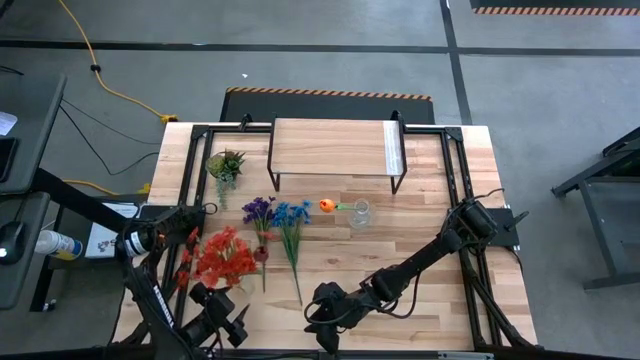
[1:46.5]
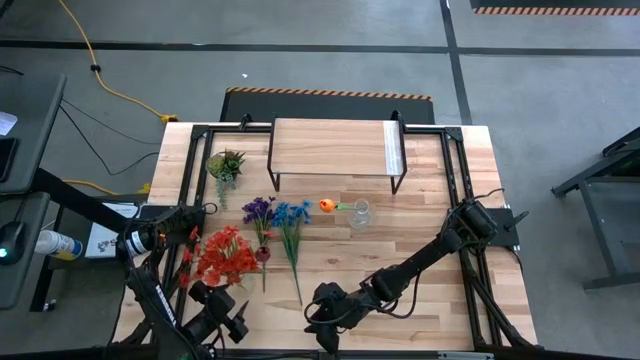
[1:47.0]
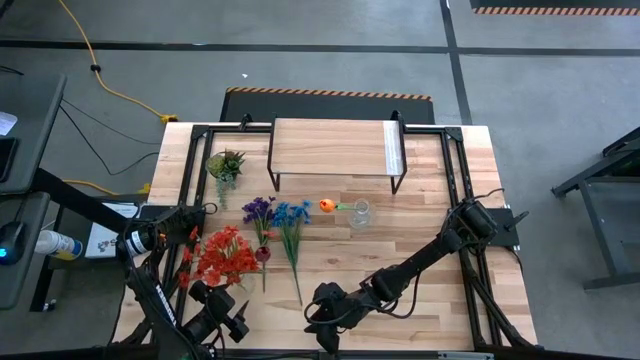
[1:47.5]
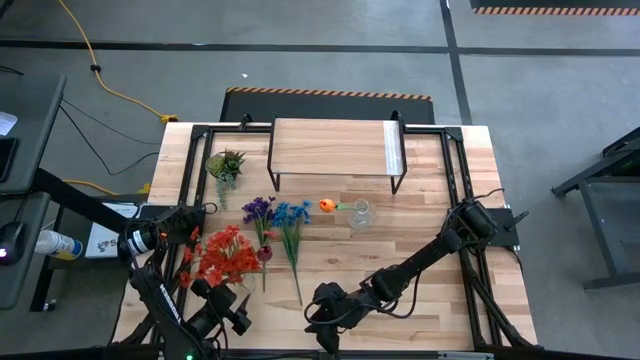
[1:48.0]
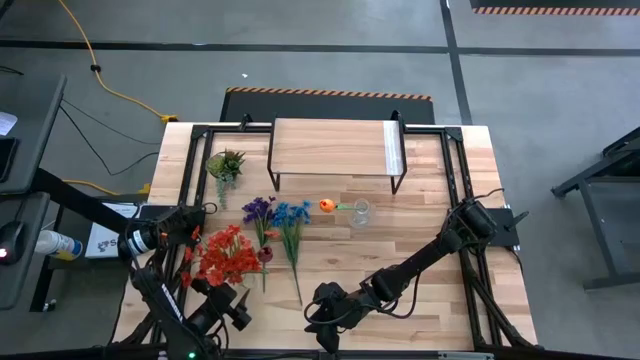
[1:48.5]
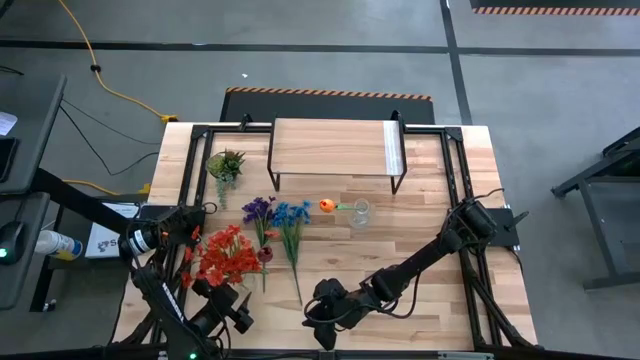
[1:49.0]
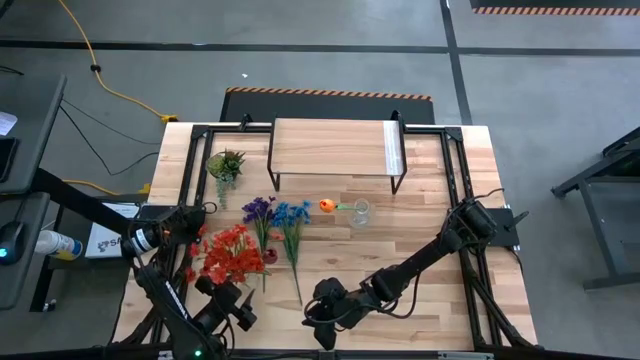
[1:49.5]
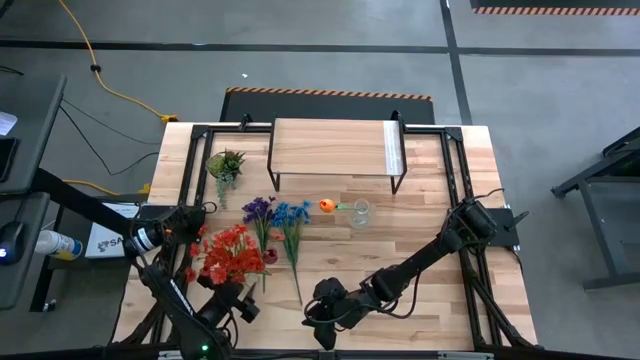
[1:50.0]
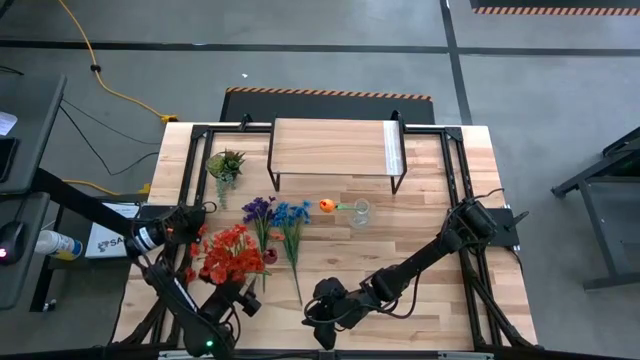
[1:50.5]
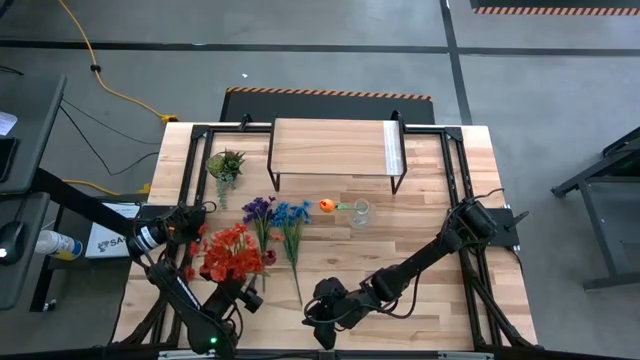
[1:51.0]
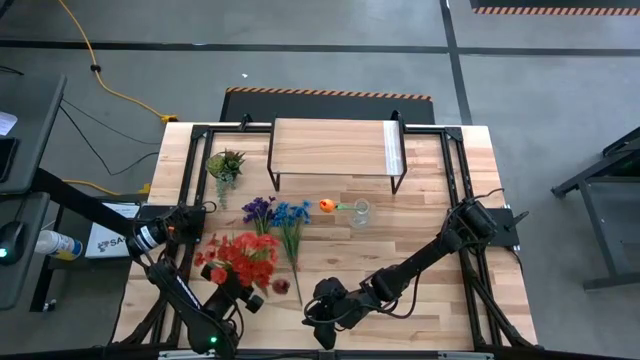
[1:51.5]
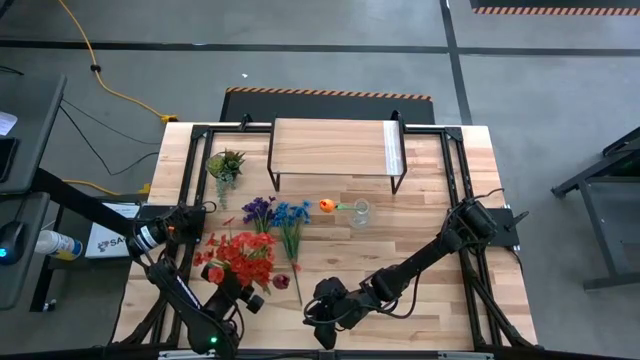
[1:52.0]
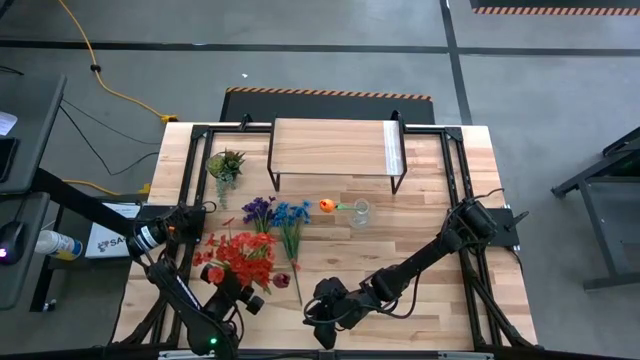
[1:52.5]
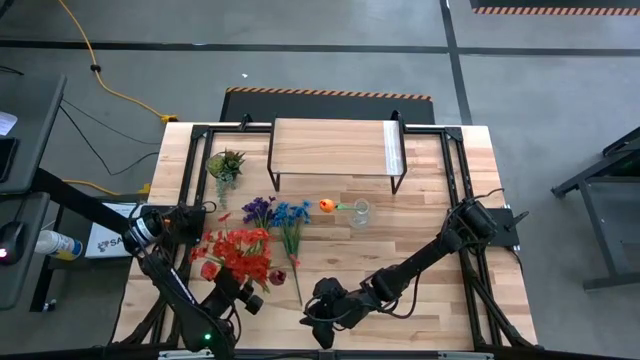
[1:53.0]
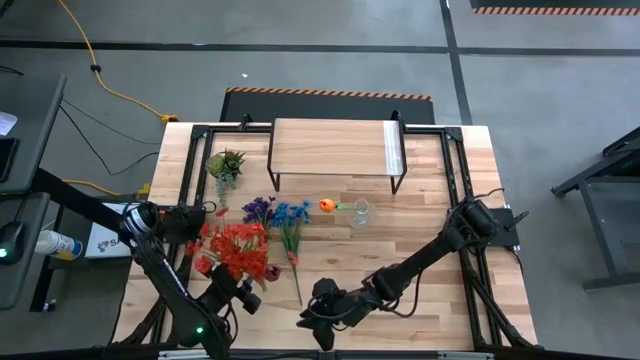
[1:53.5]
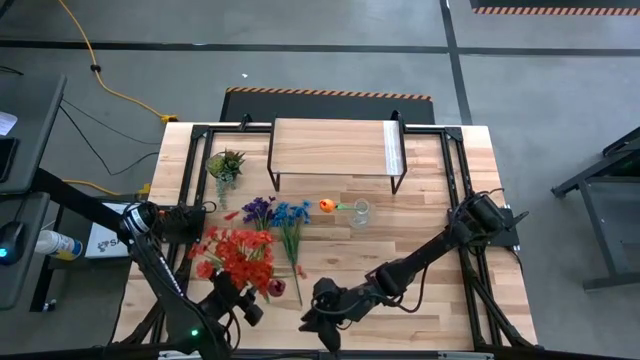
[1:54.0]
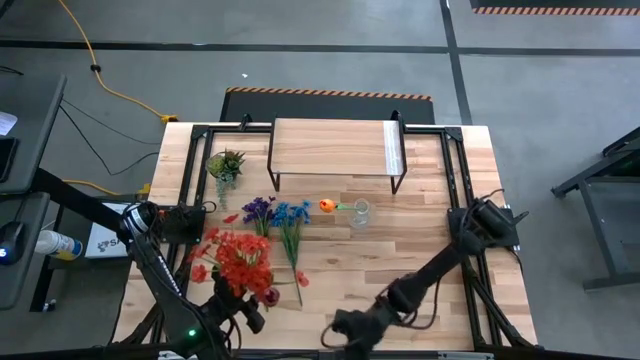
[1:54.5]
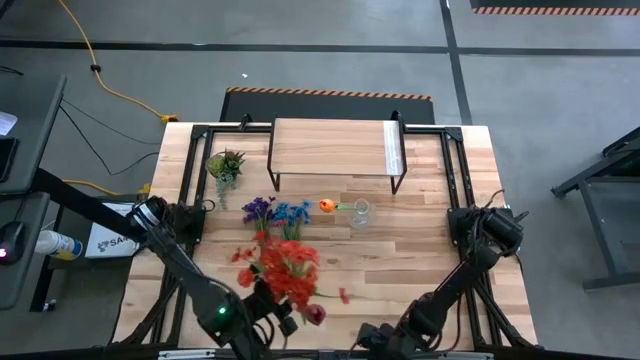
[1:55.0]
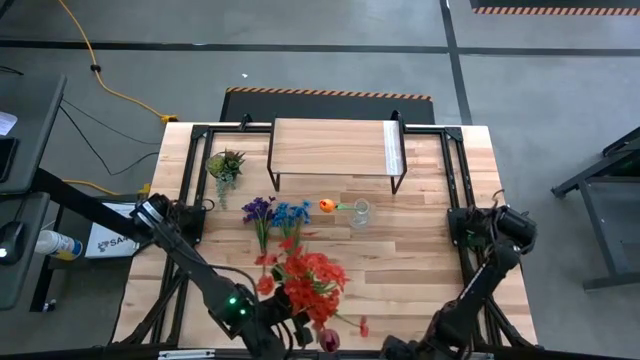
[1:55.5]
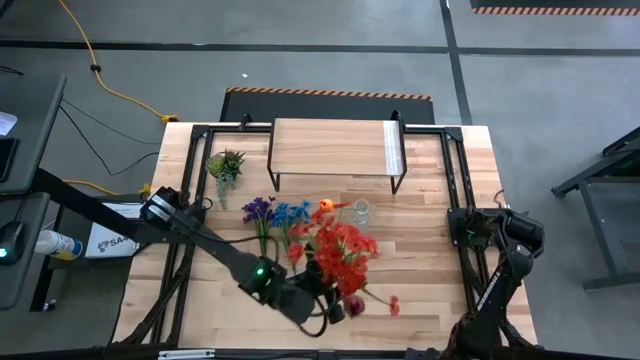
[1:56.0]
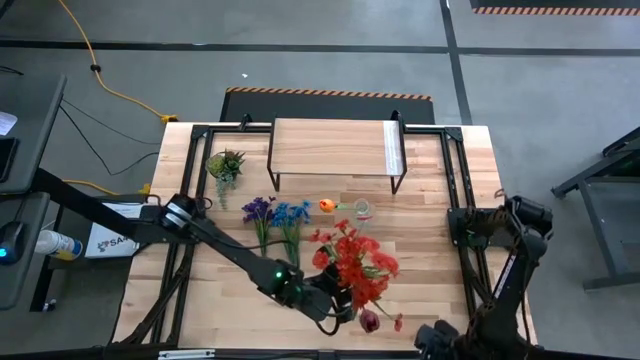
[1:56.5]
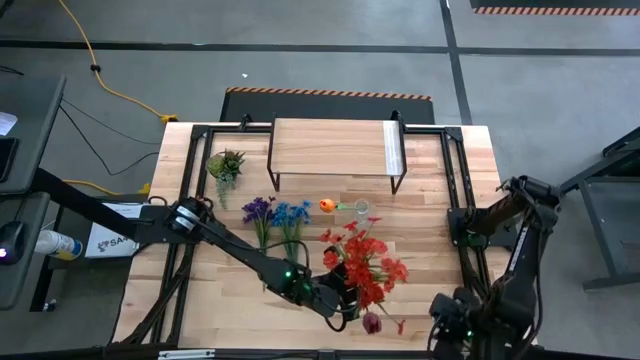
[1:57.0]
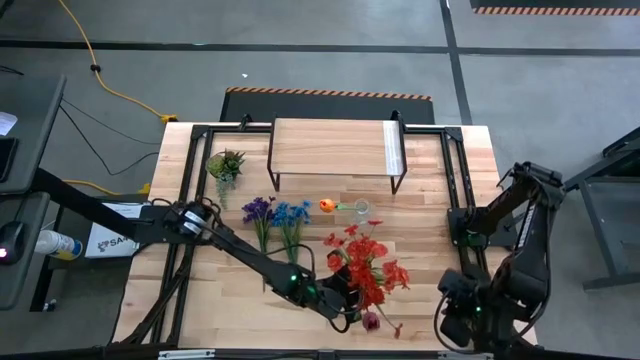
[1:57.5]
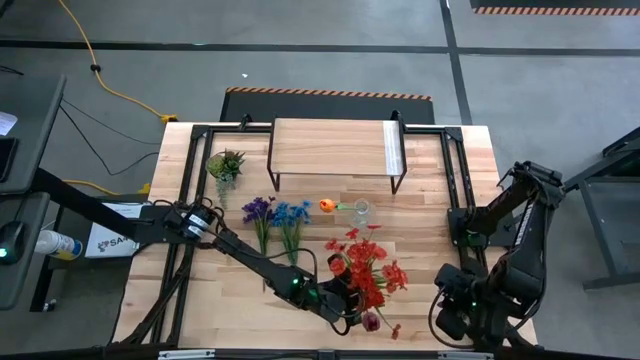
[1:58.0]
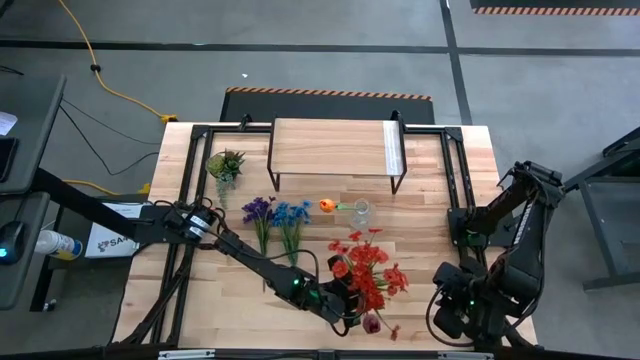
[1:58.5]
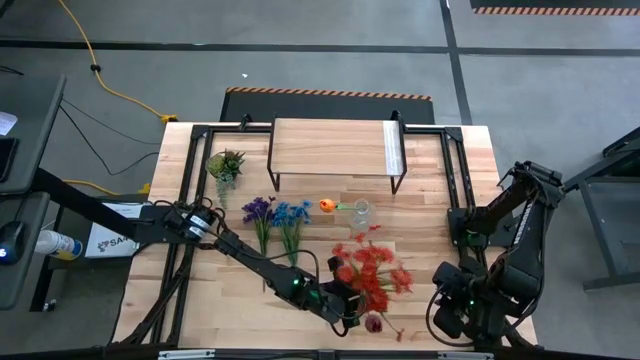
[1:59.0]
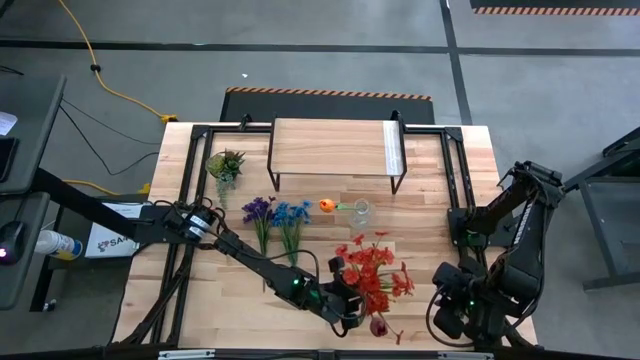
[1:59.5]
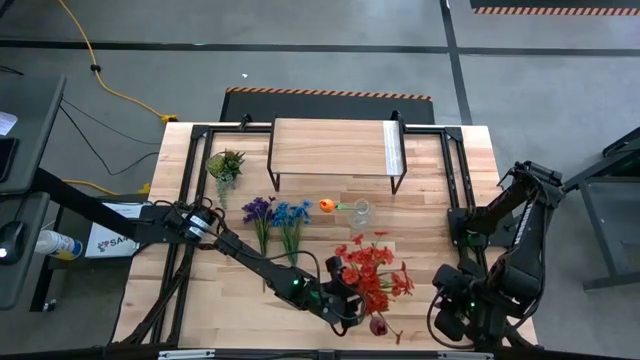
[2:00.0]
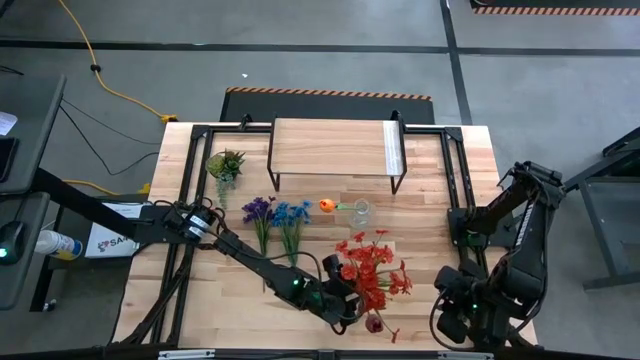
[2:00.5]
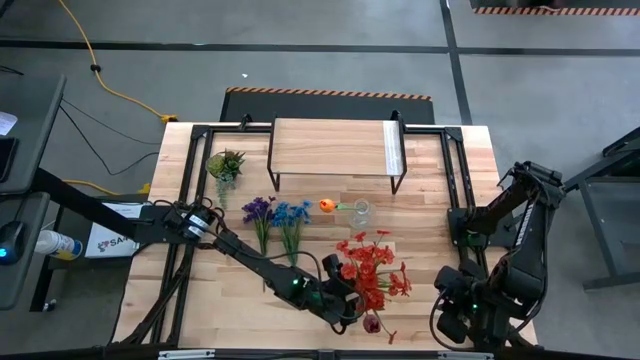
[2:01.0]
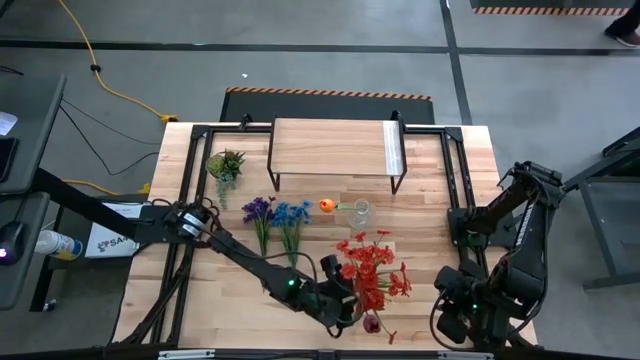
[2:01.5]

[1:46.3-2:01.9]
Task: Pick and place flowers into a vace then onto a shelf
Move the bottom transparent vase to the bottom center of the table

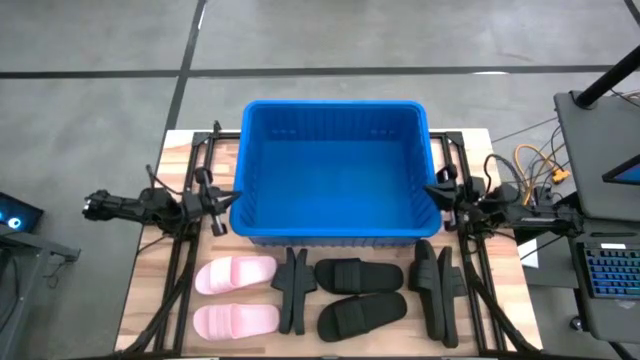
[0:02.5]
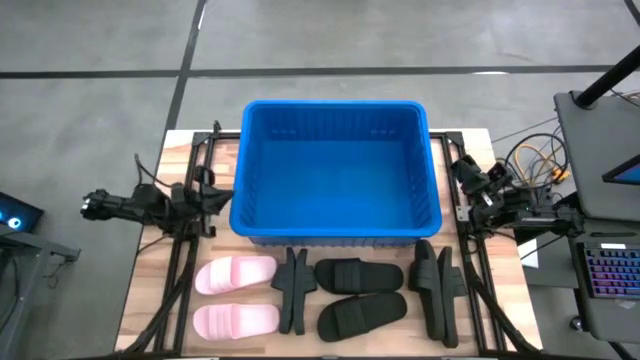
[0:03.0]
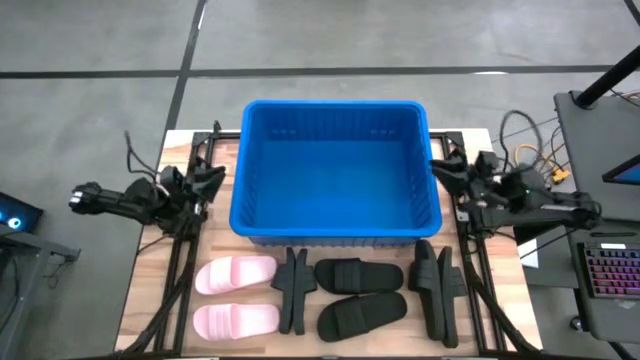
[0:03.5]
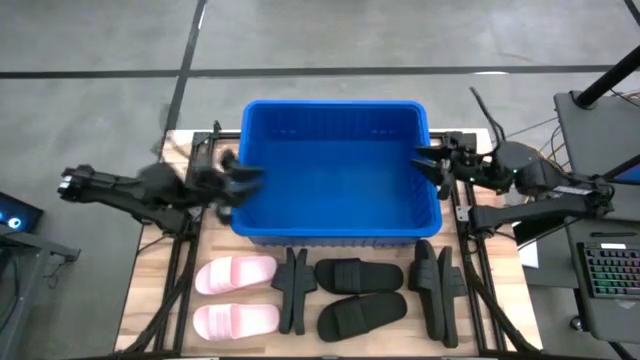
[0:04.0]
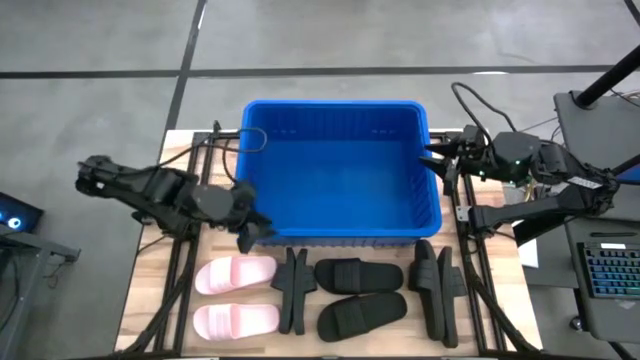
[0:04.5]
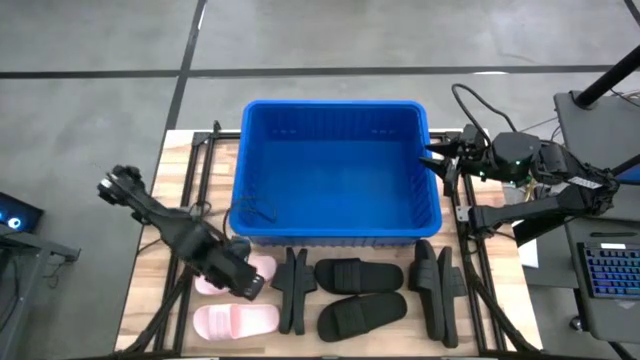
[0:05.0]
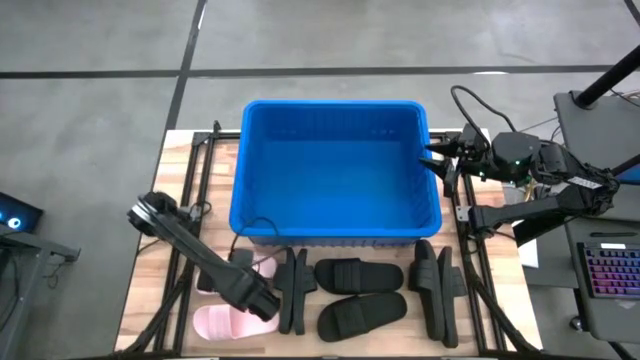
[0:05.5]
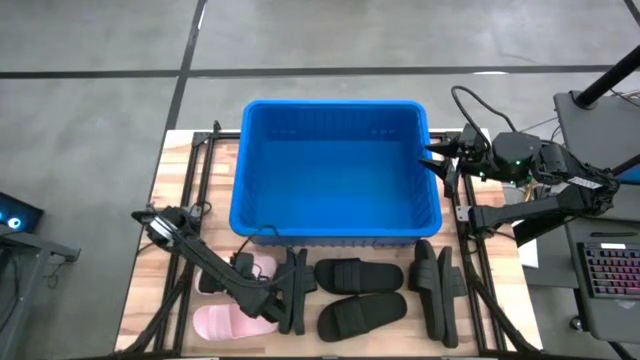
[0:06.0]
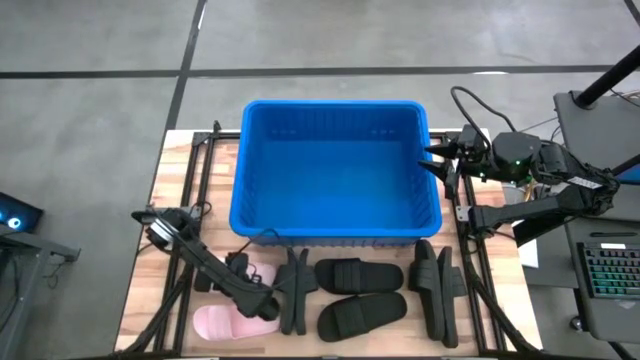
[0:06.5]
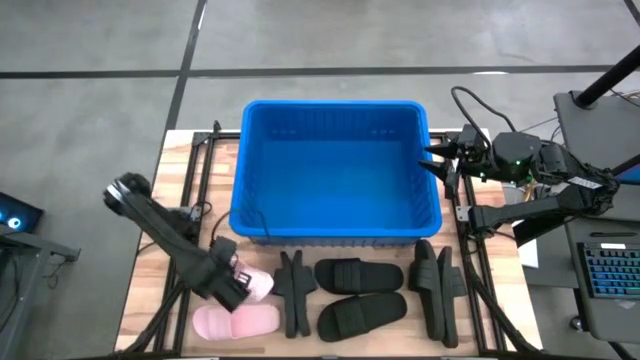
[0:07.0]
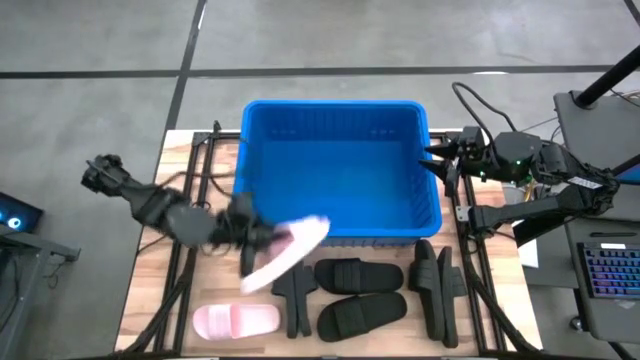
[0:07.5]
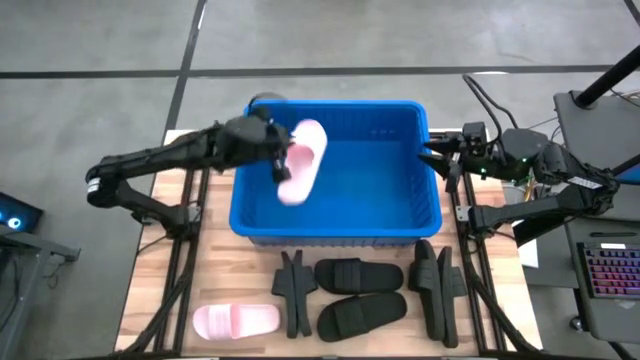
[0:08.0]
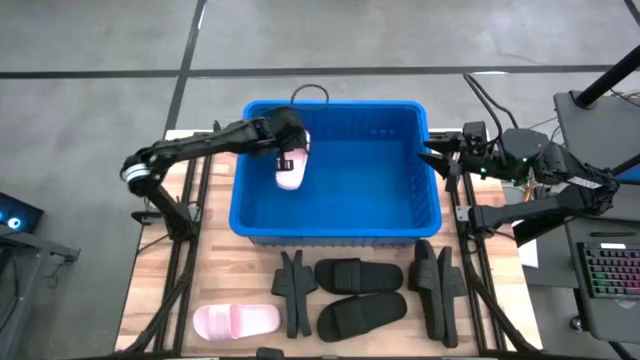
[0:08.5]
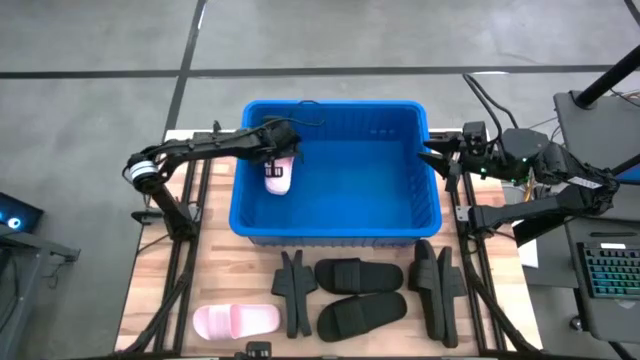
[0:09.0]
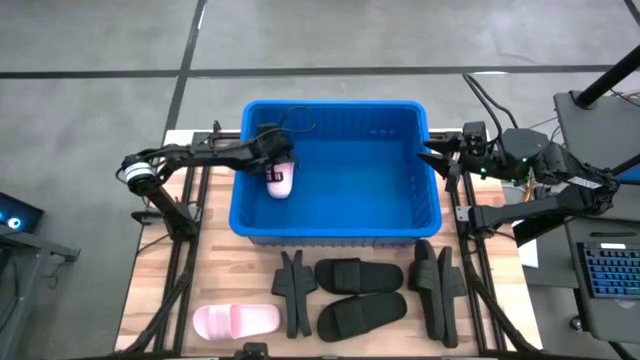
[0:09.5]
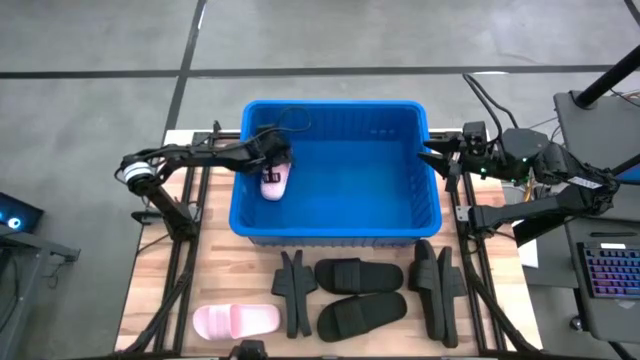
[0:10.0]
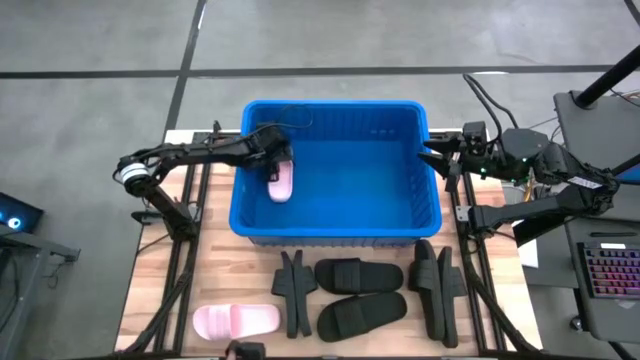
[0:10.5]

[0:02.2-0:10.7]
Task: Pick and place slides into bin
Put the top pink slide into the bin
